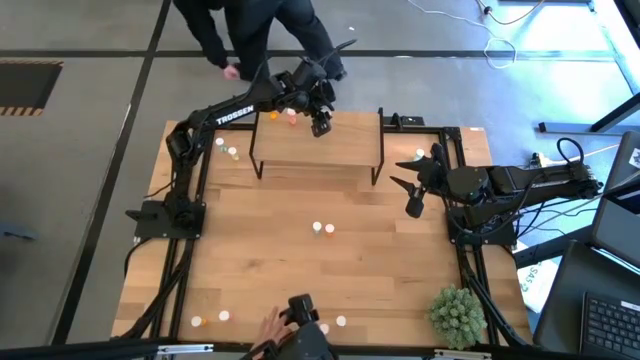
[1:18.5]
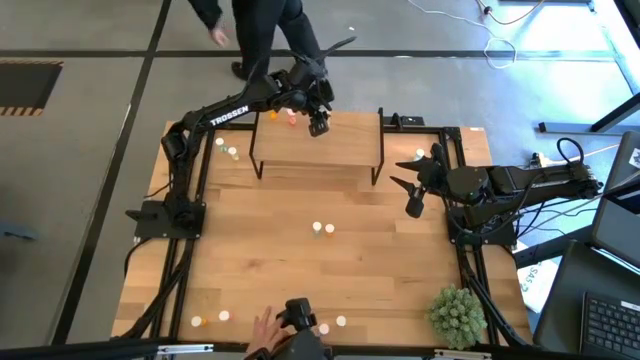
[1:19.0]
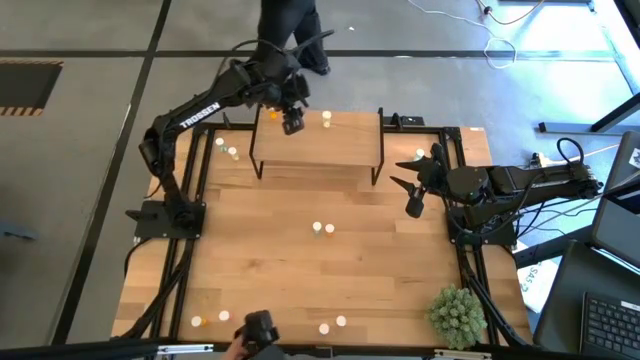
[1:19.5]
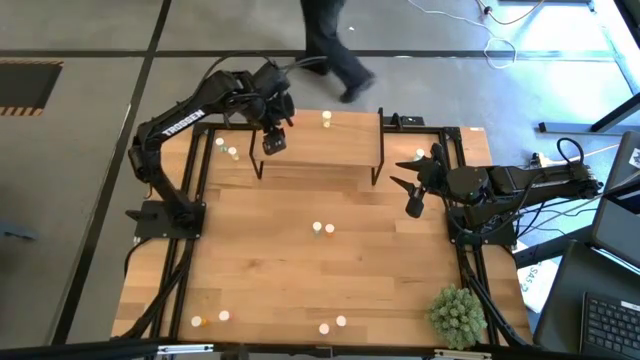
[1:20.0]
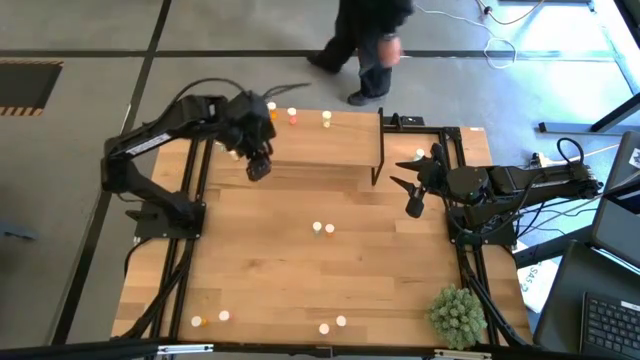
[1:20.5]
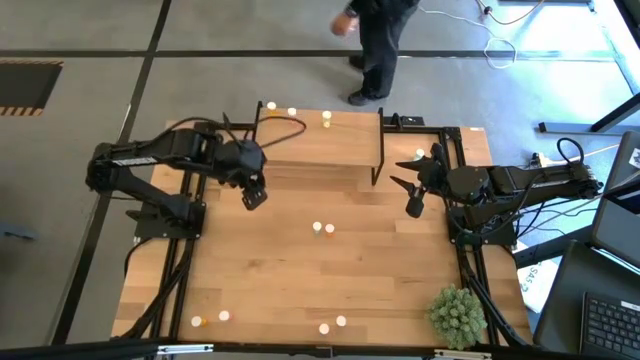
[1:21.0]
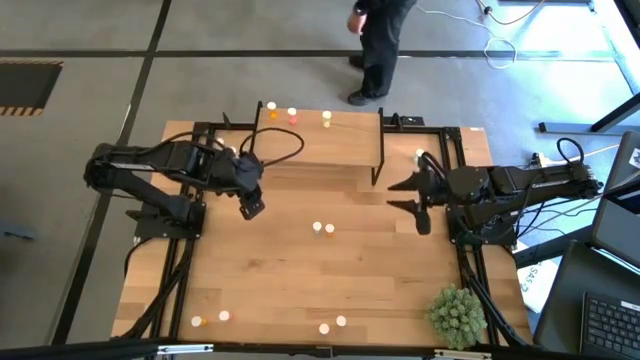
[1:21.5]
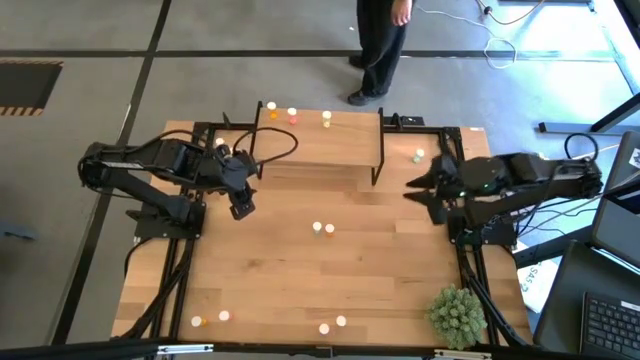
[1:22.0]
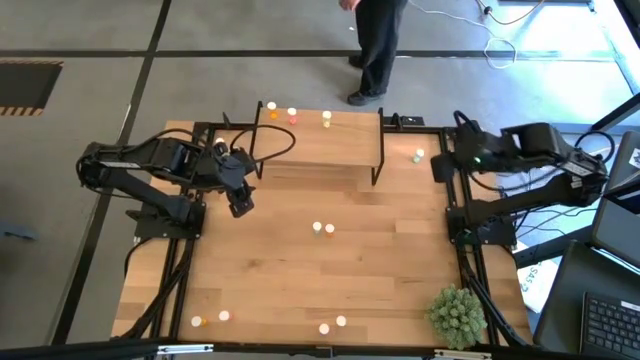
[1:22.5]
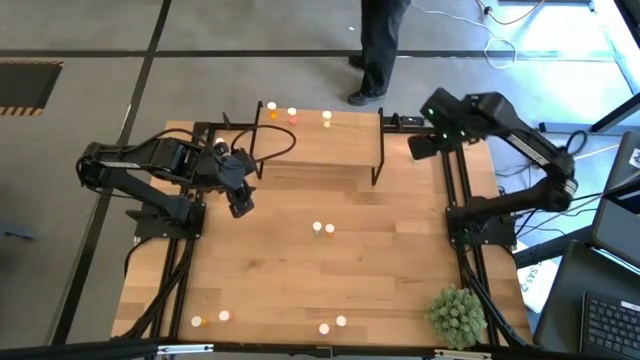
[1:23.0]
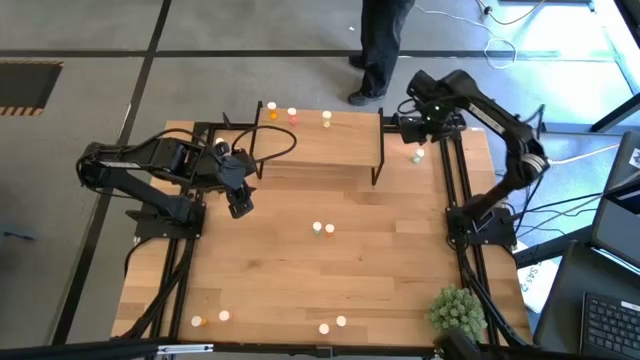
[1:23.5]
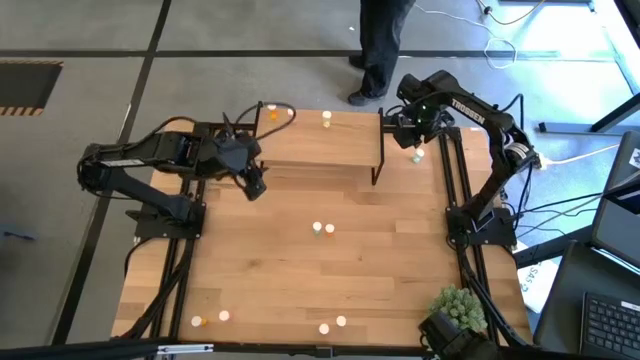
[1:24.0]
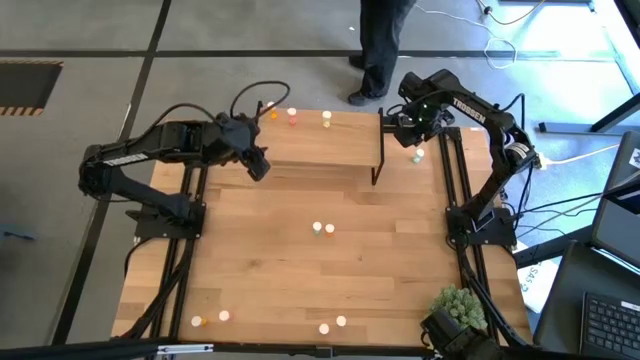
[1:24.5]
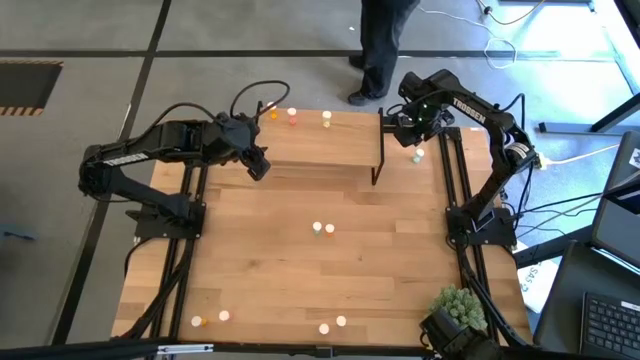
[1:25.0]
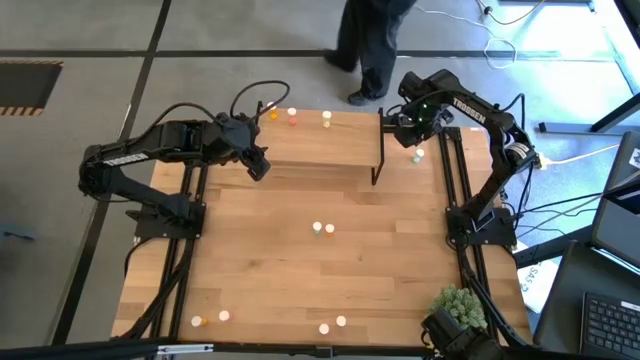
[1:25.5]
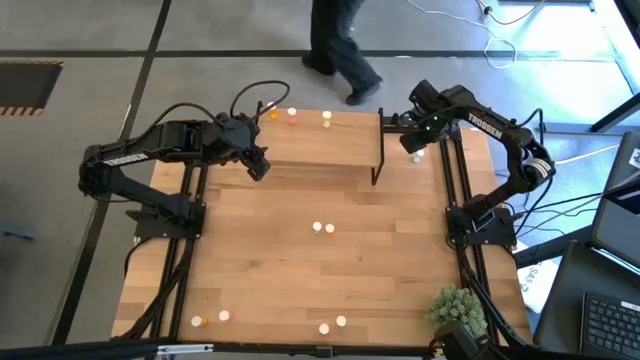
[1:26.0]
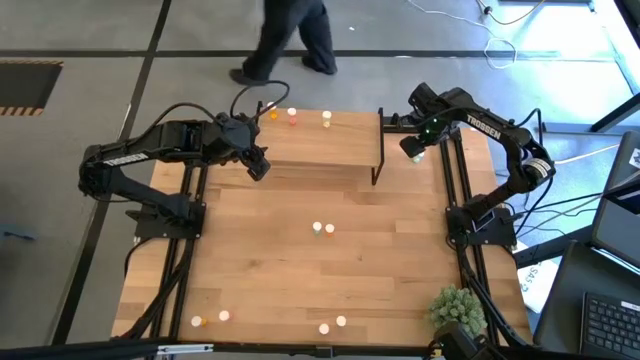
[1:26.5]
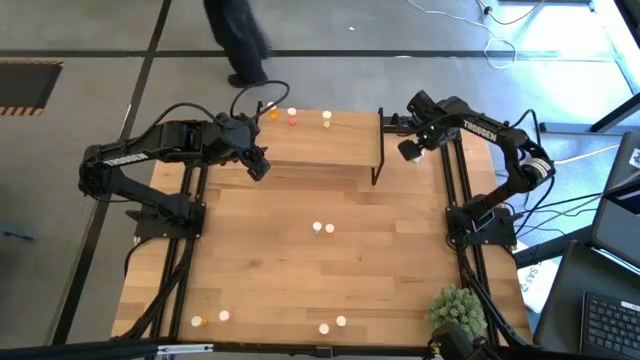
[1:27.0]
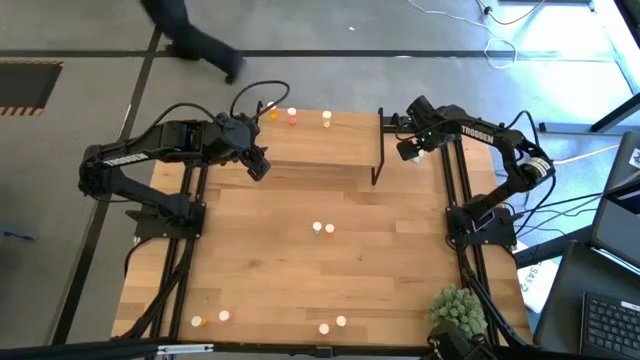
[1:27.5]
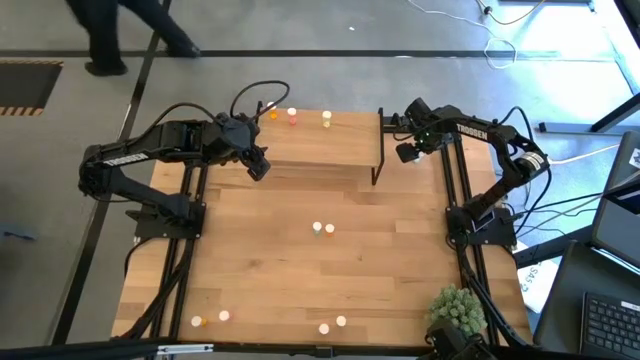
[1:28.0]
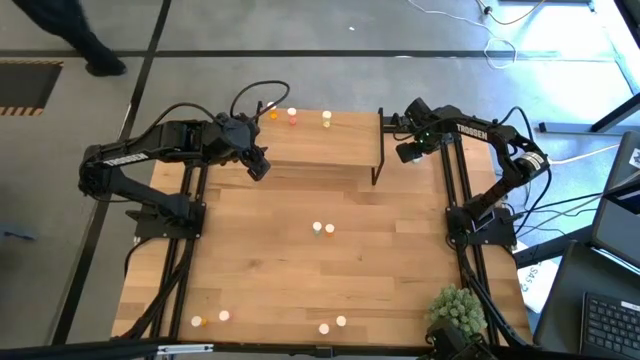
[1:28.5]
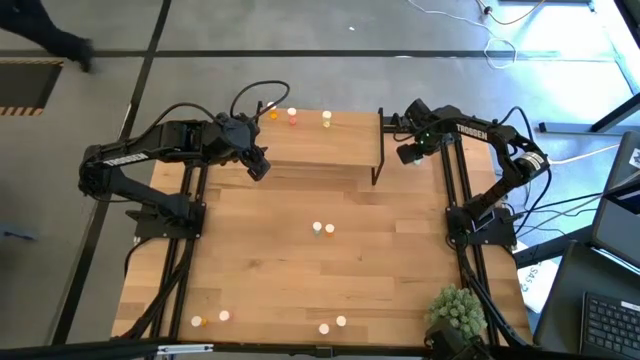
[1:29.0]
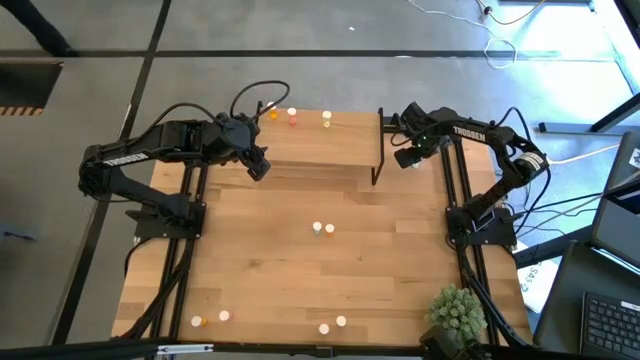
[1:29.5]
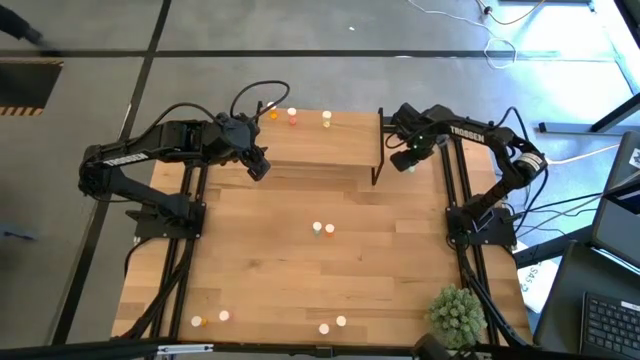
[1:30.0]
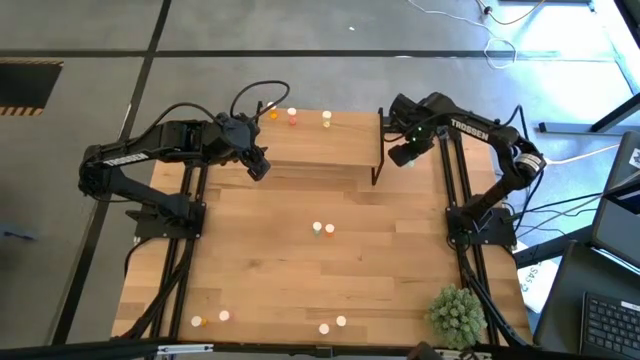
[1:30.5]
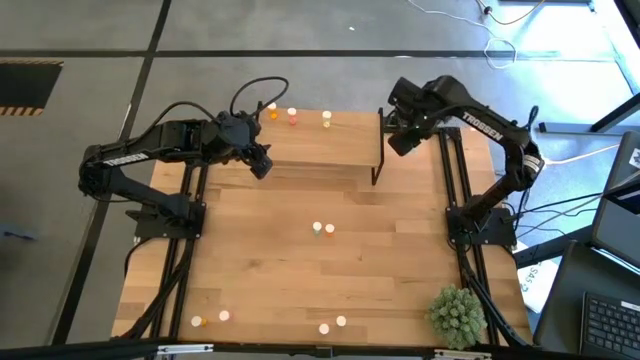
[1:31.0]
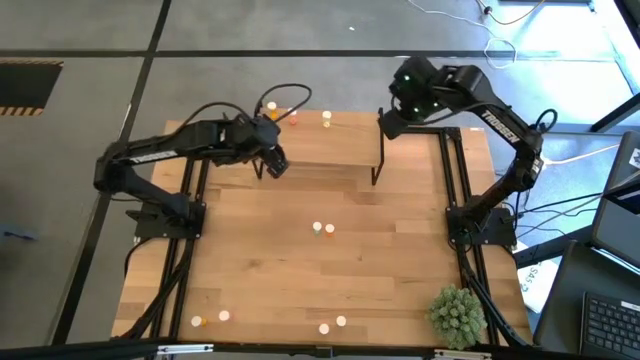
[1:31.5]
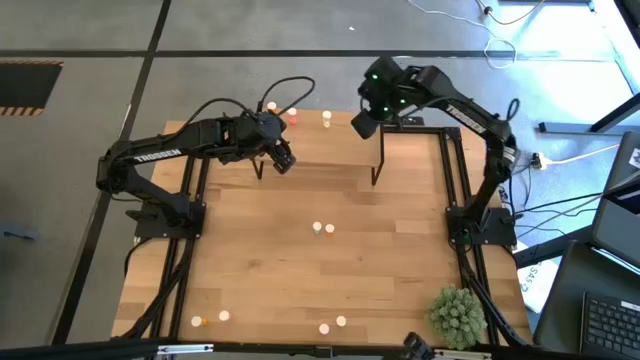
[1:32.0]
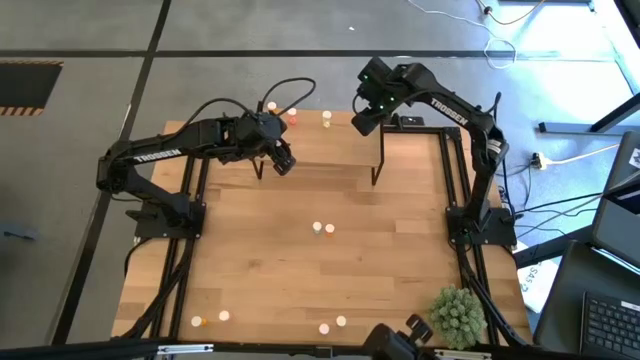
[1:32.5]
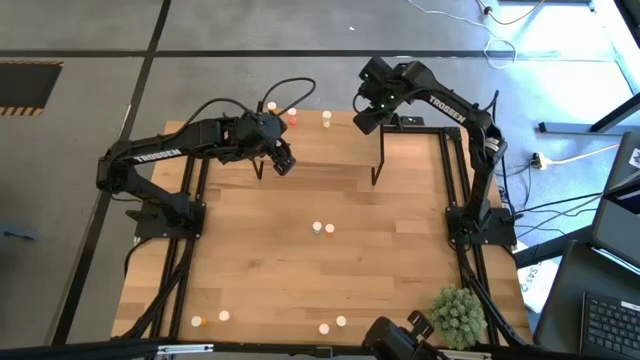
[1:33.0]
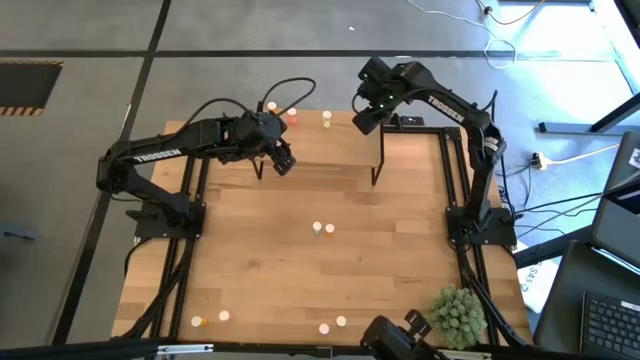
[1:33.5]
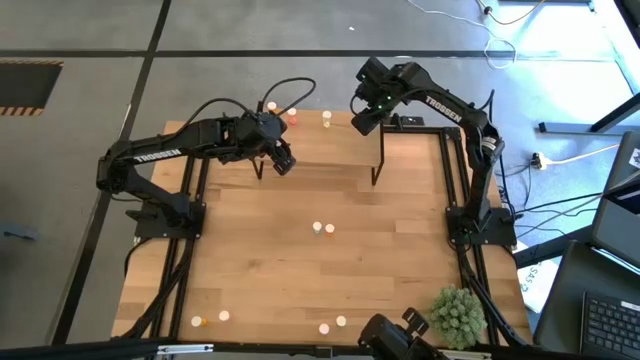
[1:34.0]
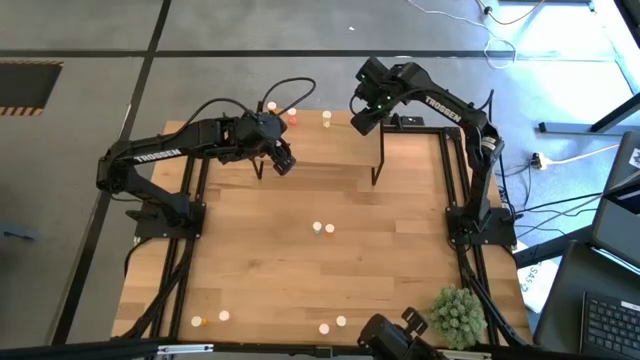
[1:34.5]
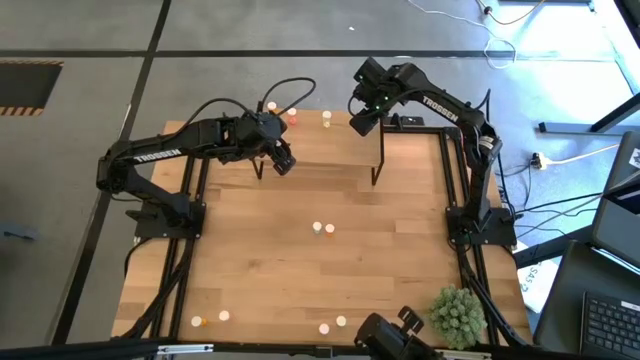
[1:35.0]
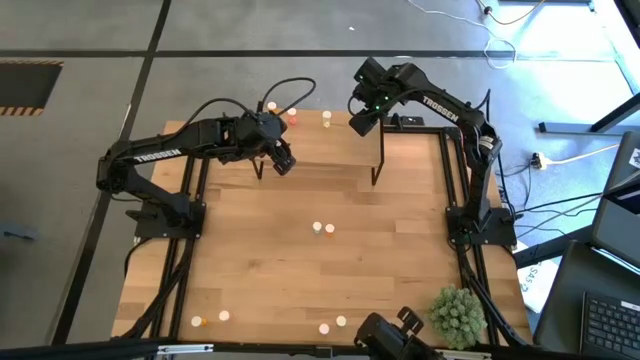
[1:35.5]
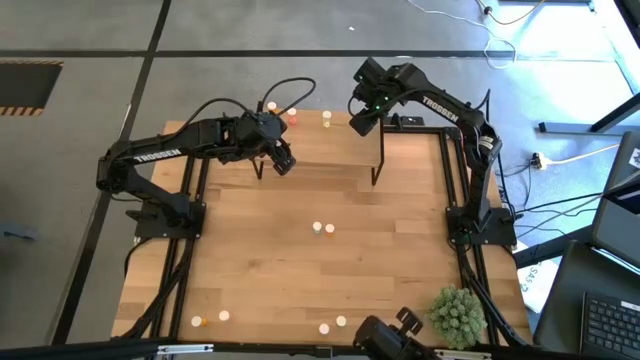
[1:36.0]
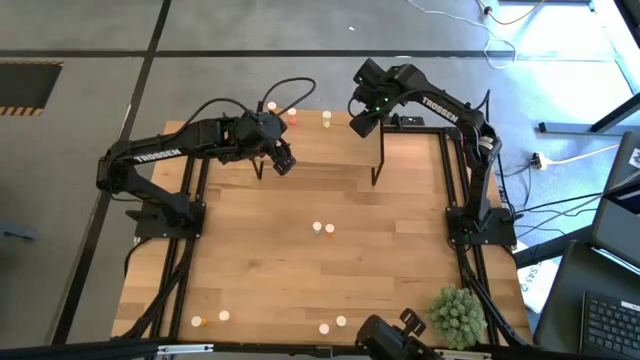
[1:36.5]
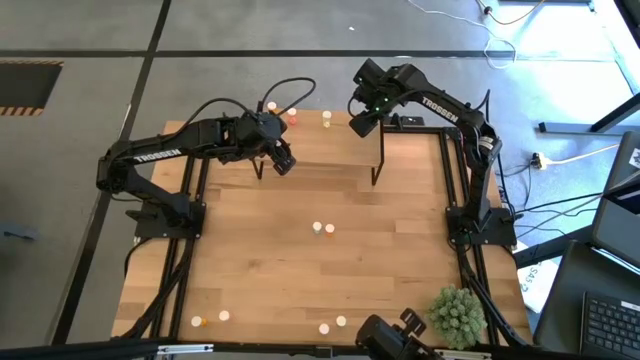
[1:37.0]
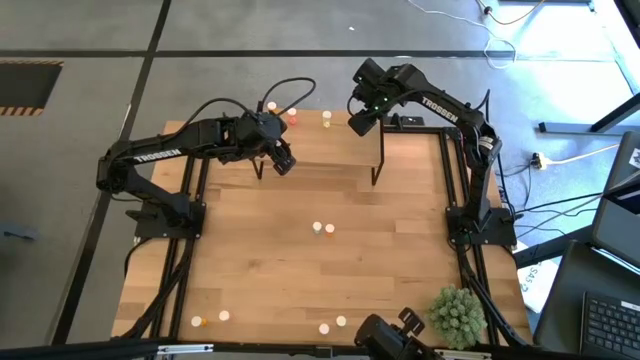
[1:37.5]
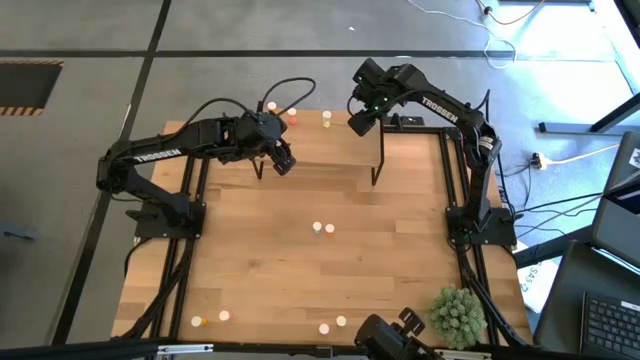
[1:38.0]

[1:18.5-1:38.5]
Task: Pick and place medicine bottles onto shelf by color
Put the top right blue pill bottle on the shelf
